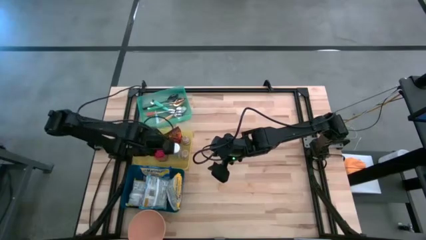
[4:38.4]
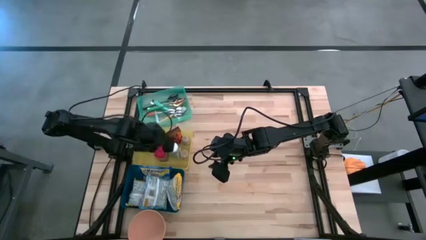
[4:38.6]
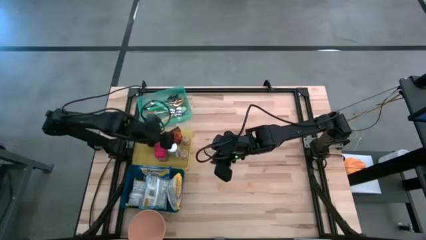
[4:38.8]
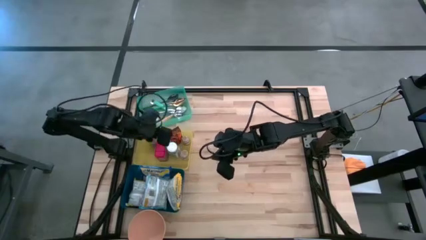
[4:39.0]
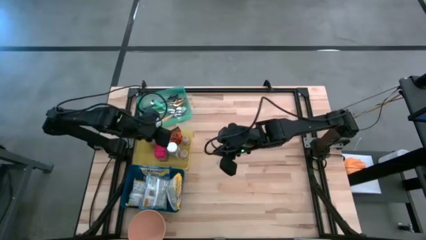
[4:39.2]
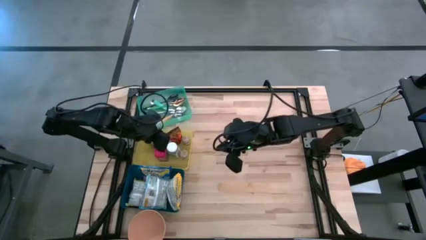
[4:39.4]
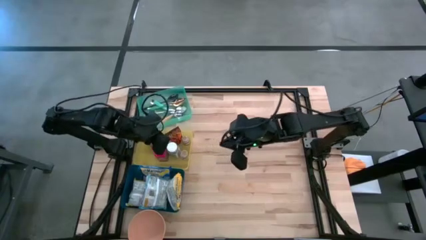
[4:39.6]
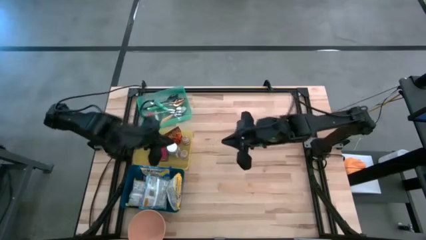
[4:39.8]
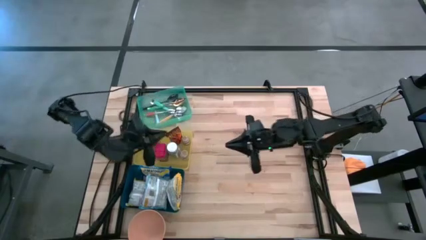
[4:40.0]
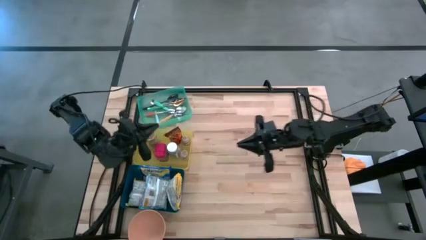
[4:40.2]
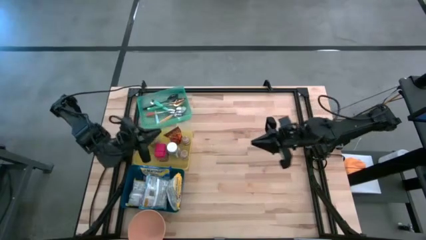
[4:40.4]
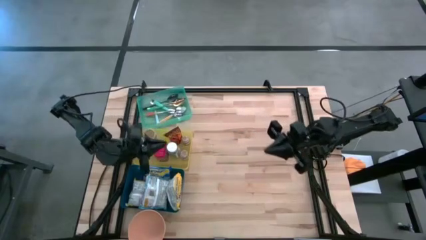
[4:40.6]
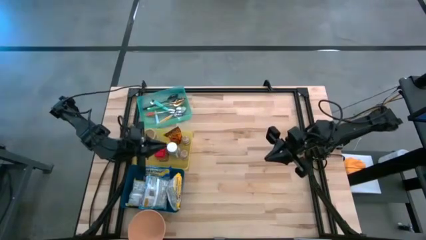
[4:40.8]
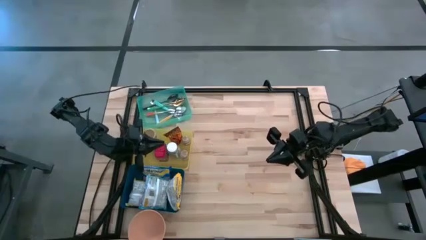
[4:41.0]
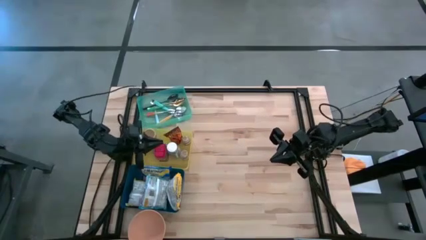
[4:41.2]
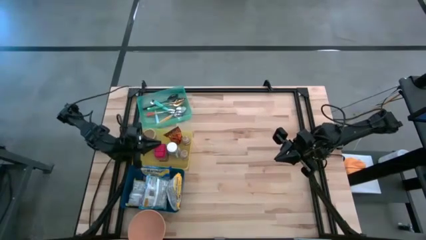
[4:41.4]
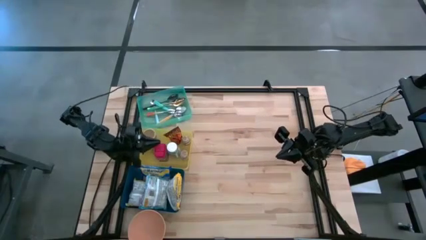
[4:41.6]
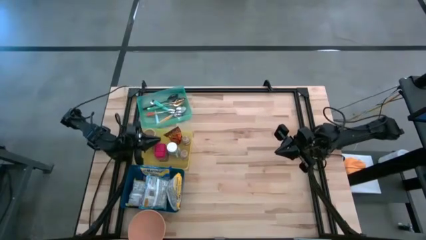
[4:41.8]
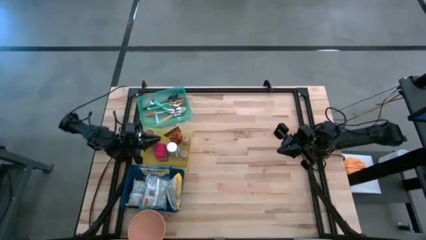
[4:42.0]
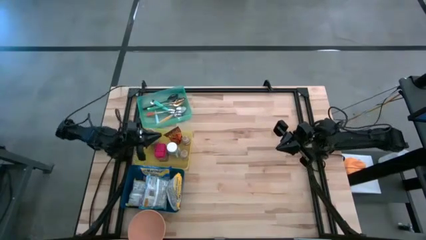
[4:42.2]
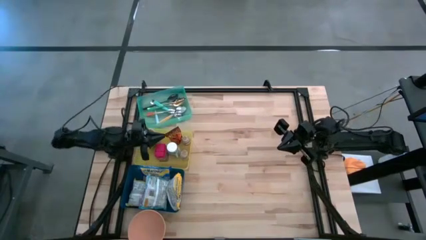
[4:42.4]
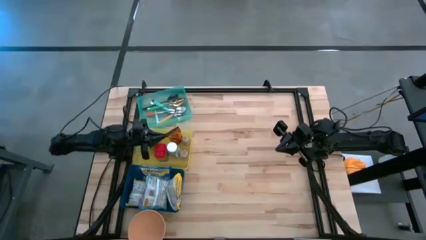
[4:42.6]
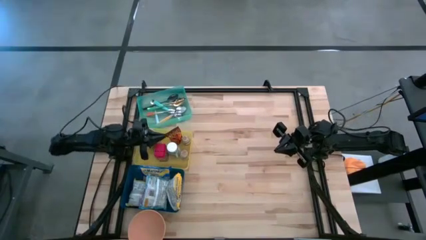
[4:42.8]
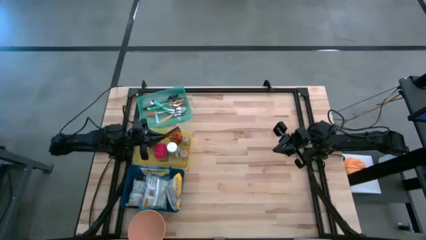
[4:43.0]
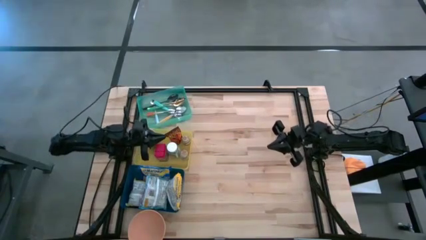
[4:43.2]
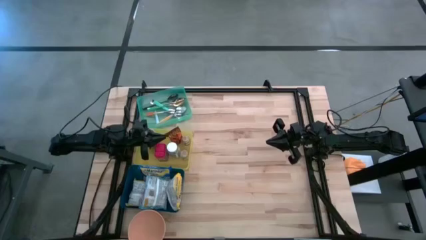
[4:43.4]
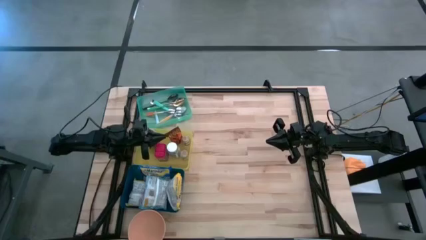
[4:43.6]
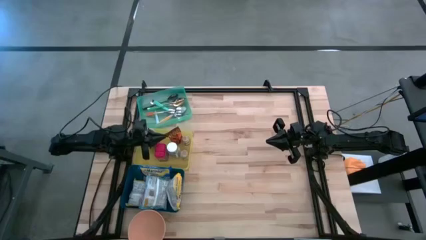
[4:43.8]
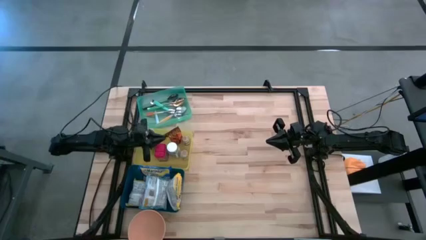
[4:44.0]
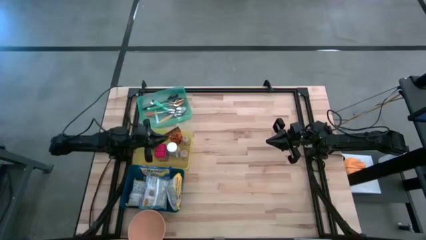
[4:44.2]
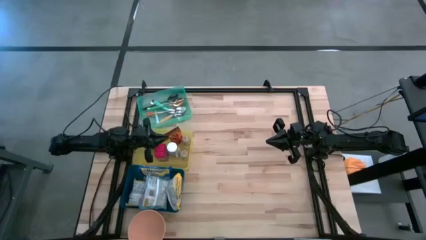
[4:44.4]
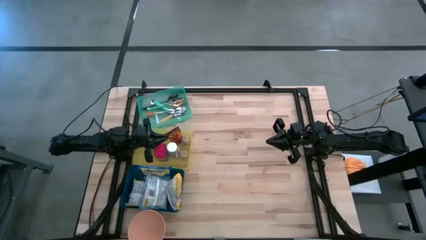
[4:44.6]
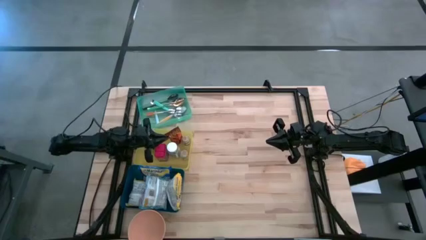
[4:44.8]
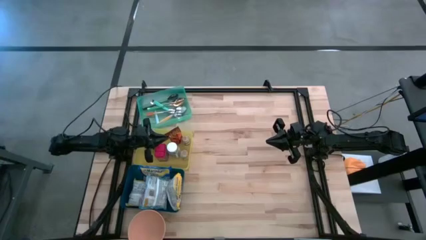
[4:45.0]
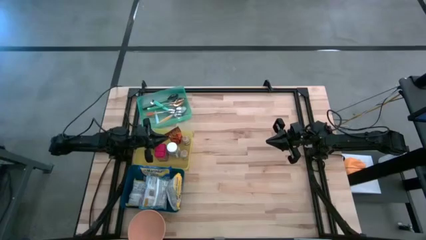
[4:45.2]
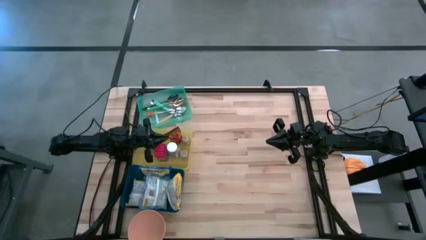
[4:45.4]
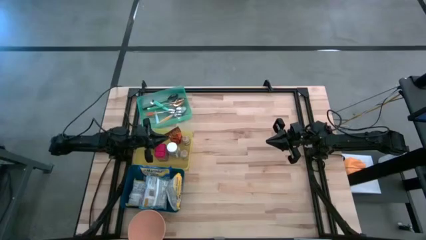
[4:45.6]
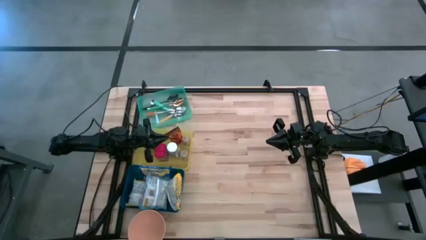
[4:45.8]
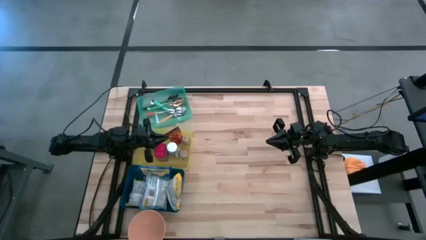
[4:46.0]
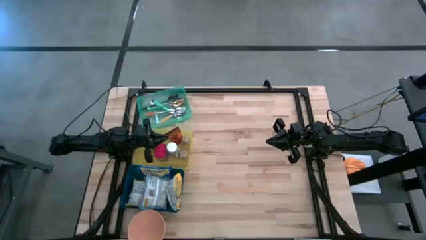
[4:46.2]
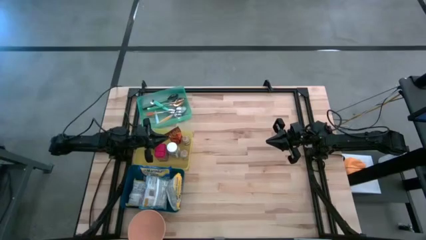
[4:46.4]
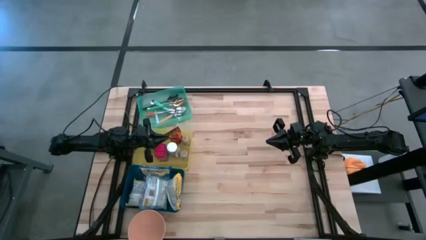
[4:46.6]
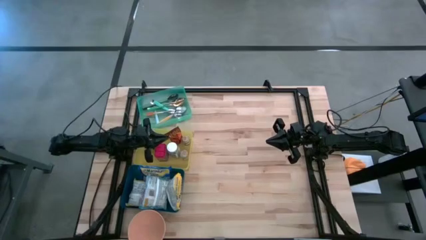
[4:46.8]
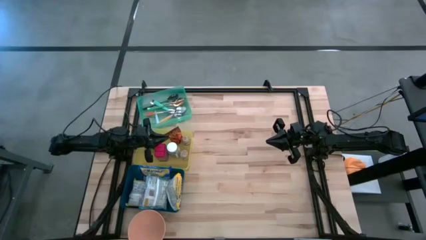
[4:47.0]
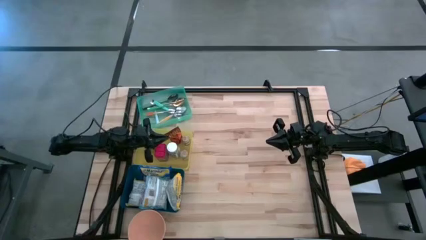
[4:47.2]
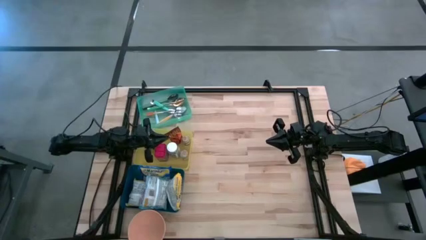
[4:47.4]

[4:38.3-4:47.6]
Return to Home Position
